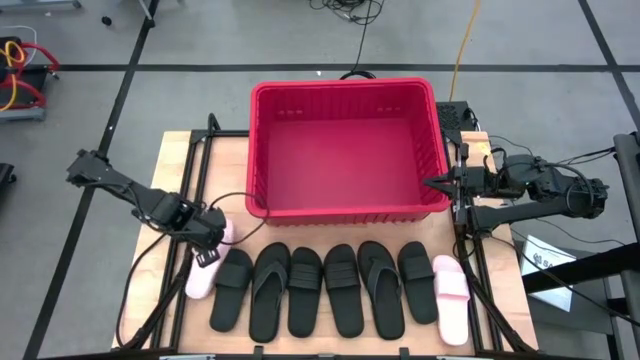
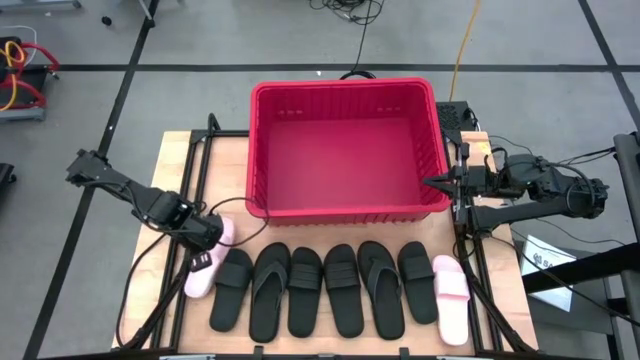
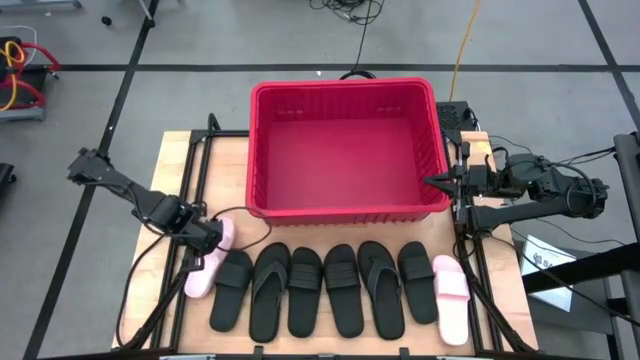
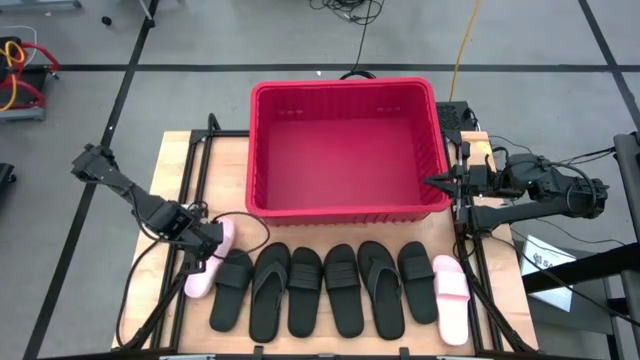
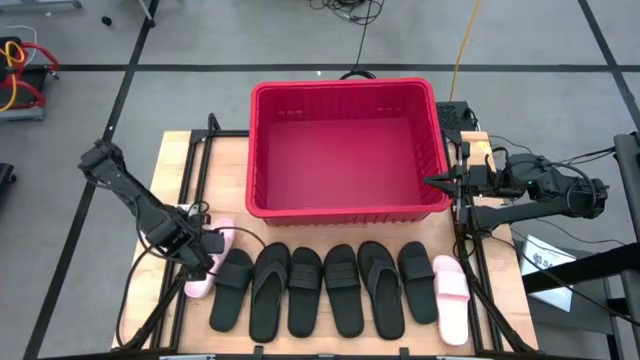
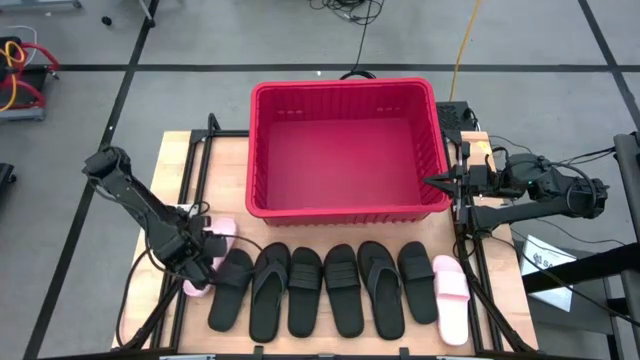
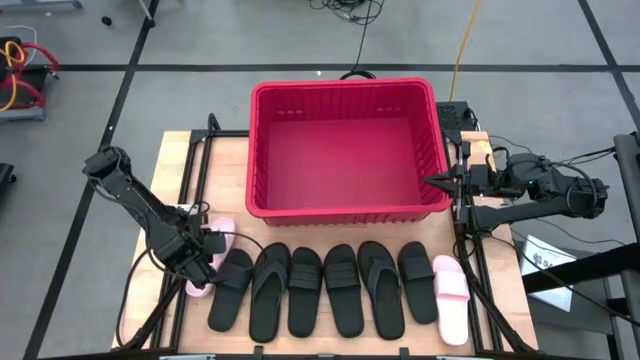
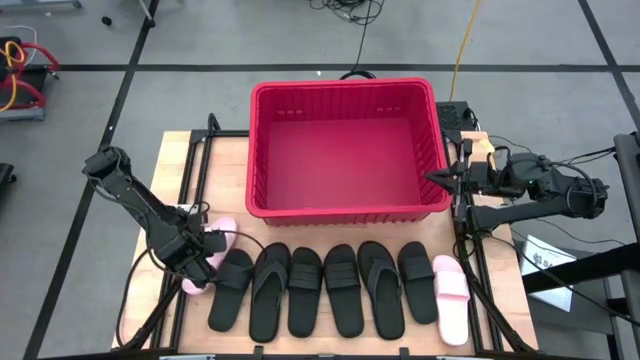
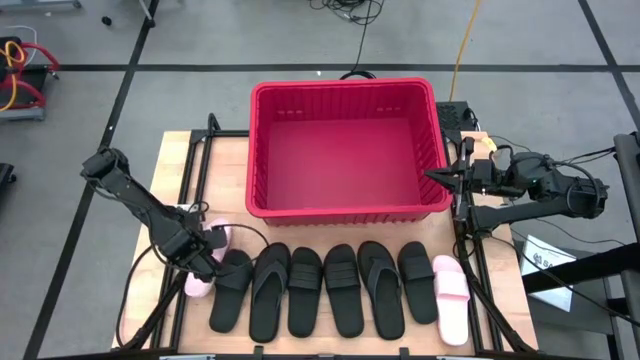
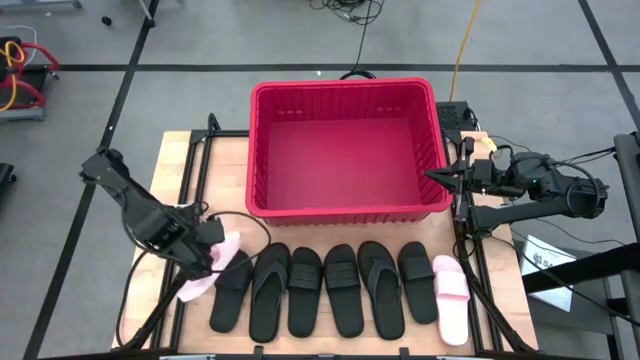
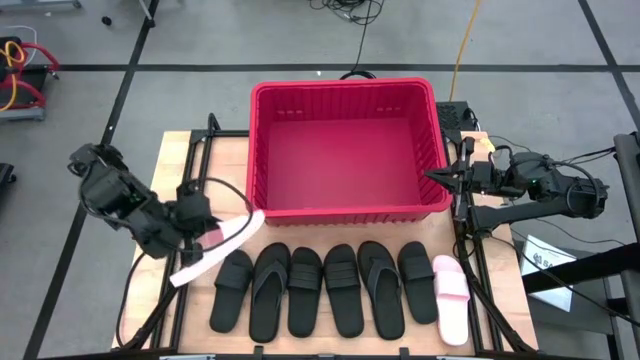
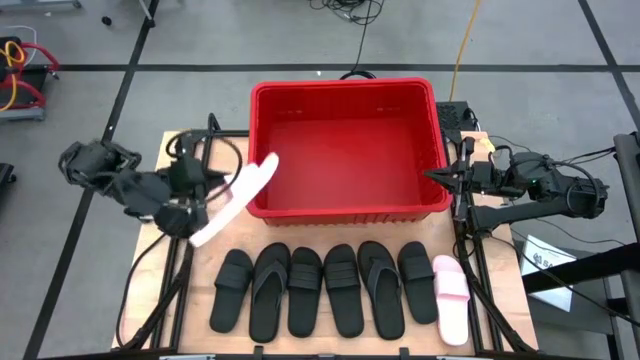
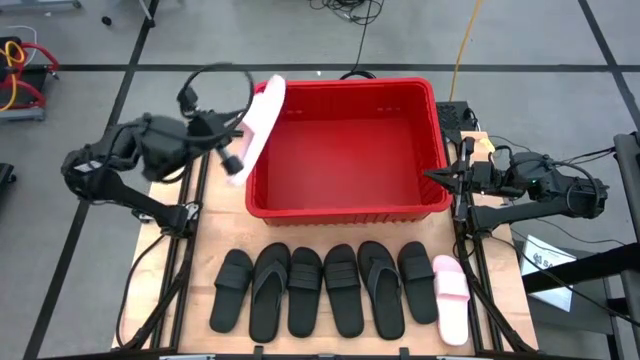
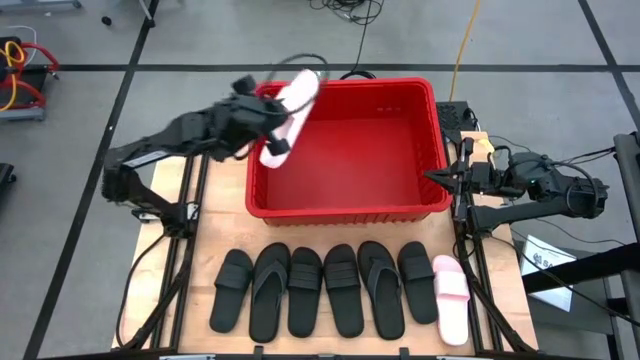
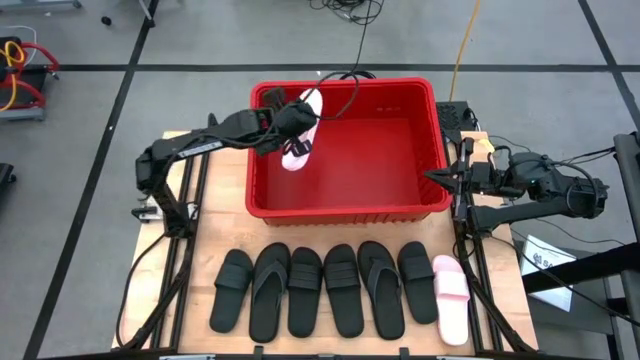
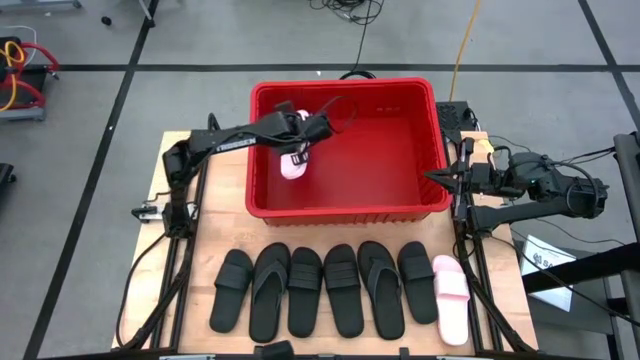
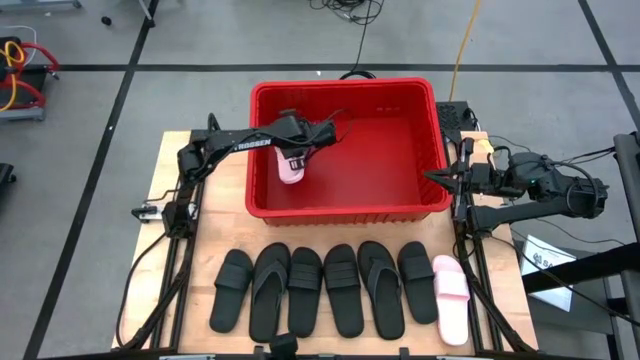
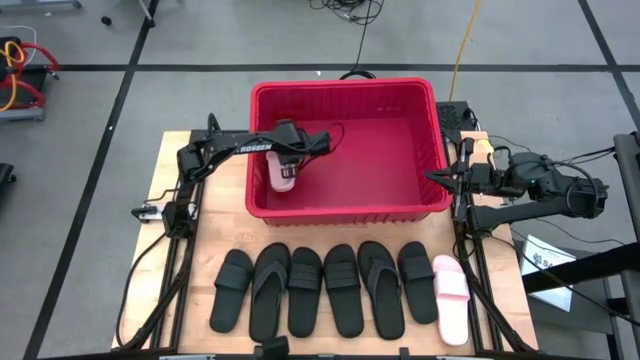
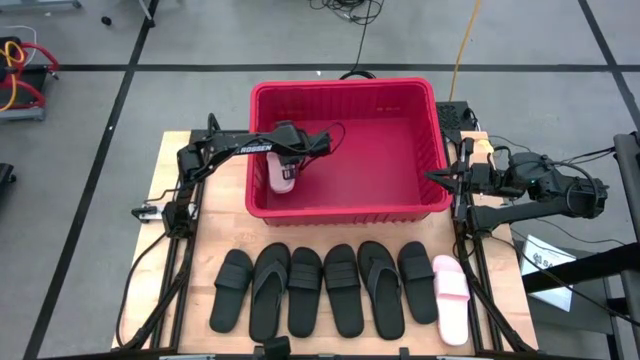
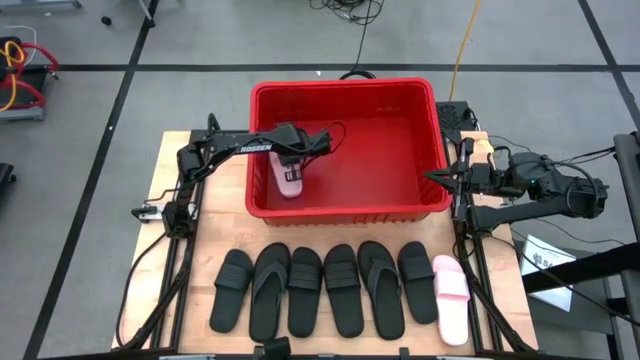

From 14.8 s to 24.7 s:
Task: Pick and place slides into bin
Put the pink slide into the red bin

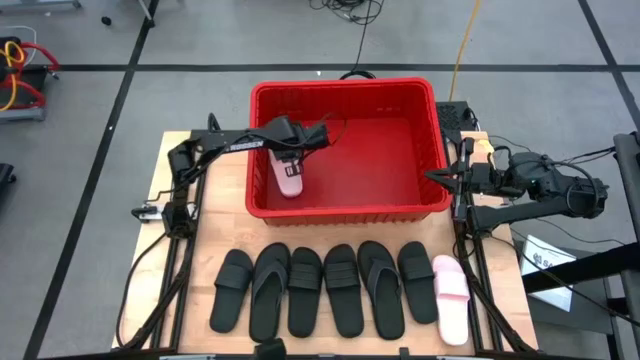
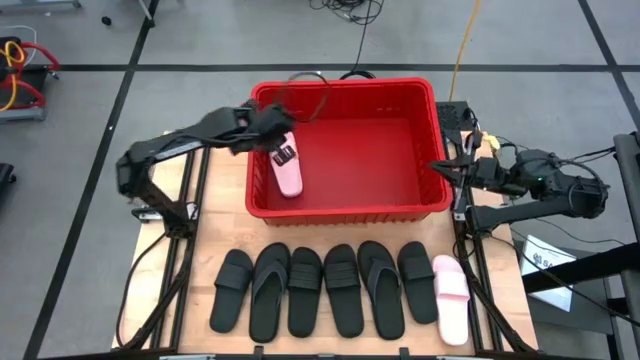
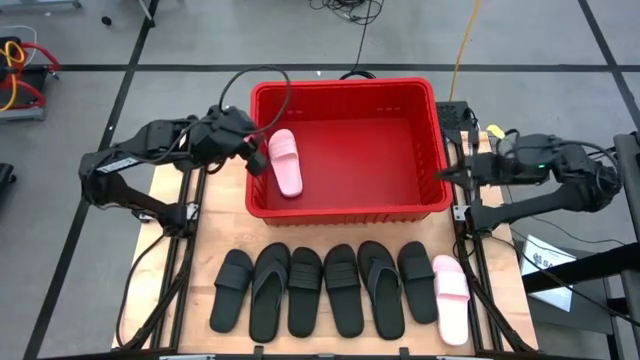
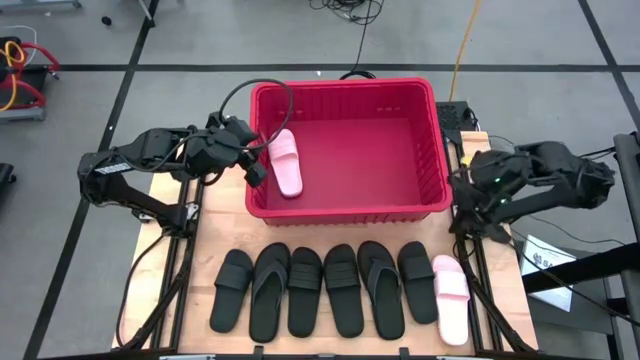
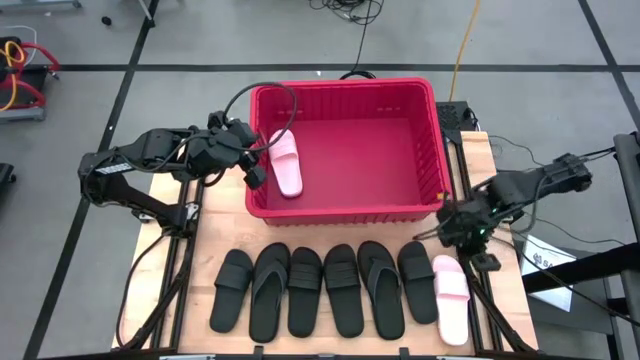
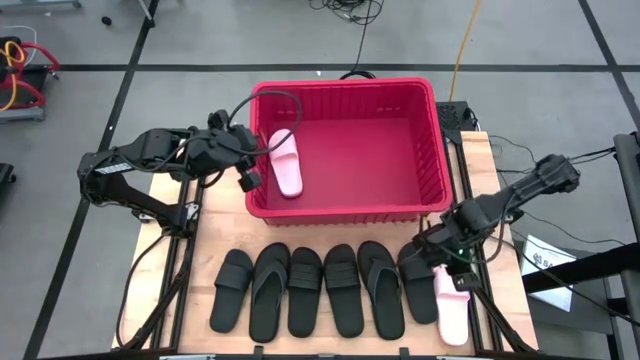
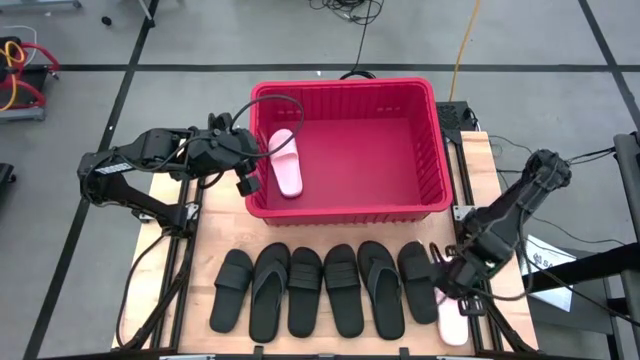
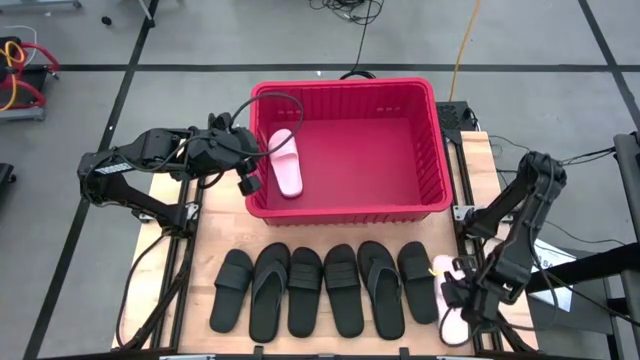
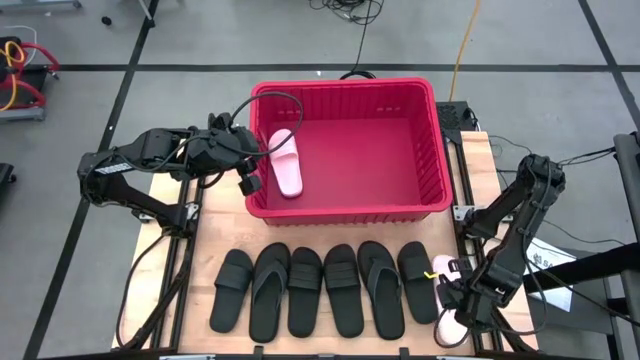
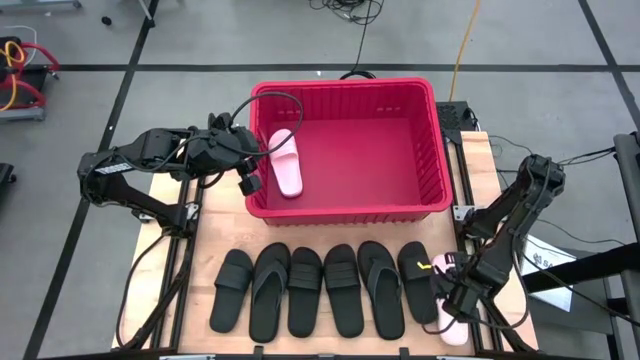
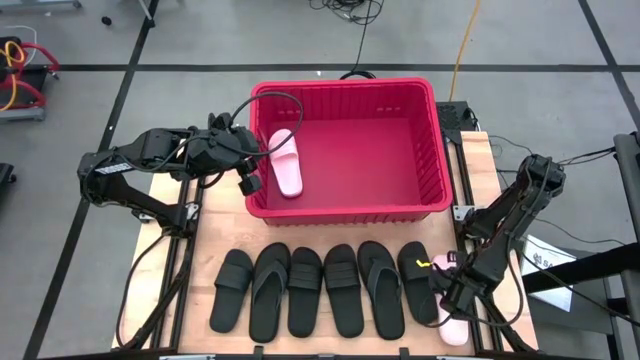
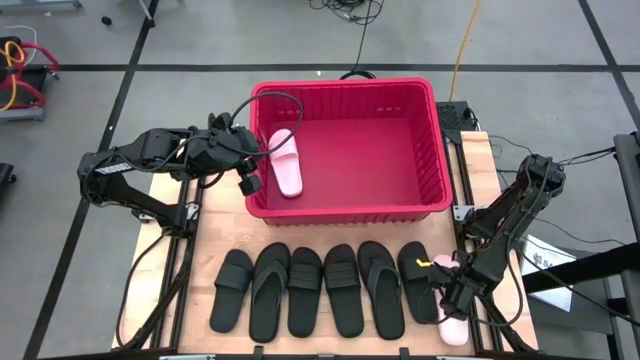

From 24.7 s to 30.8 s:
Put the pink slide into the red bin

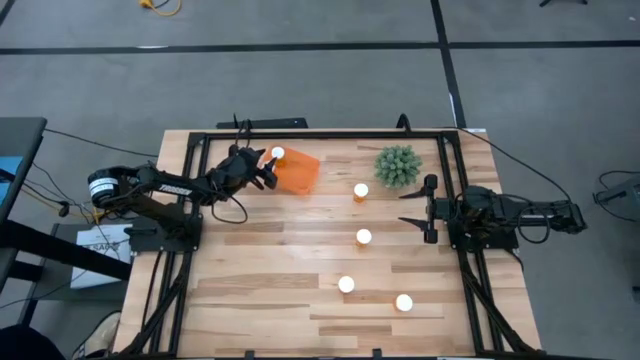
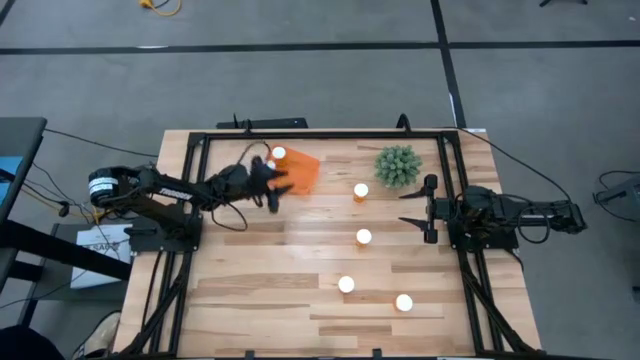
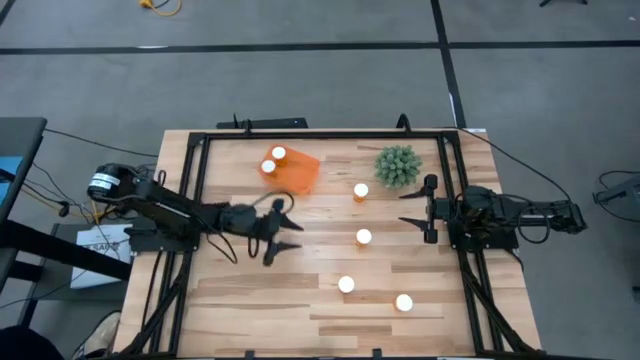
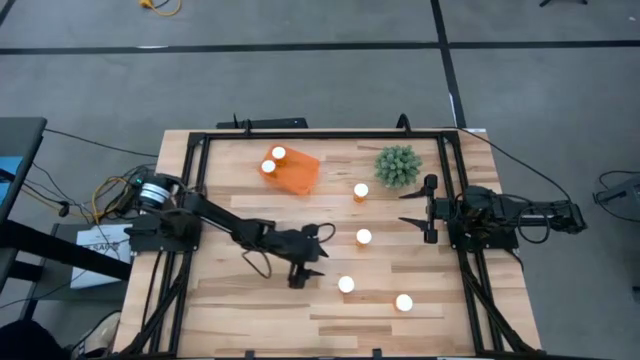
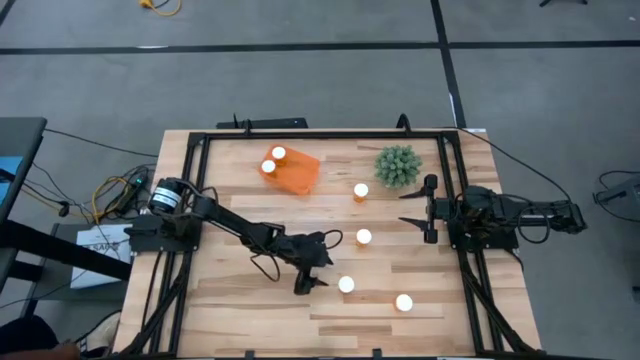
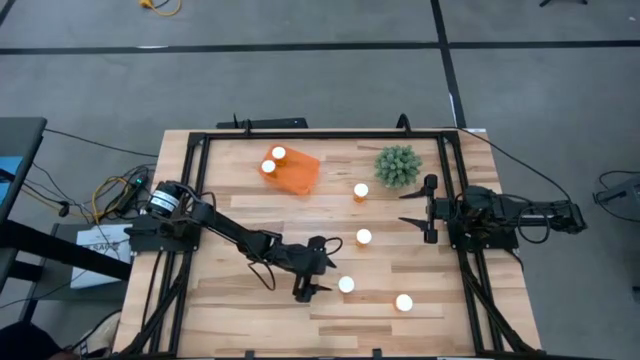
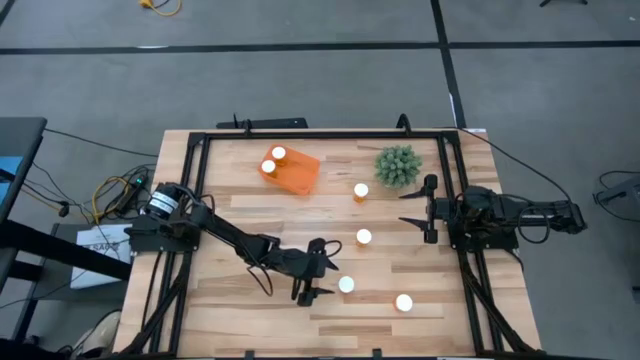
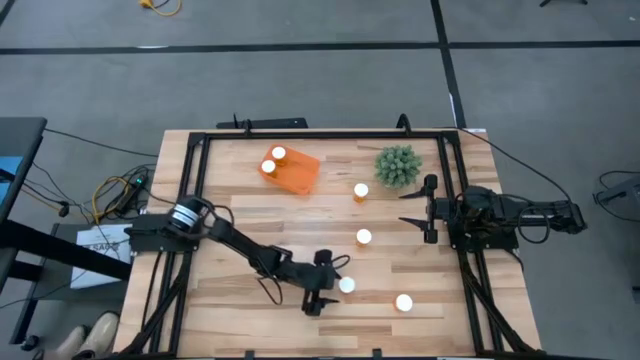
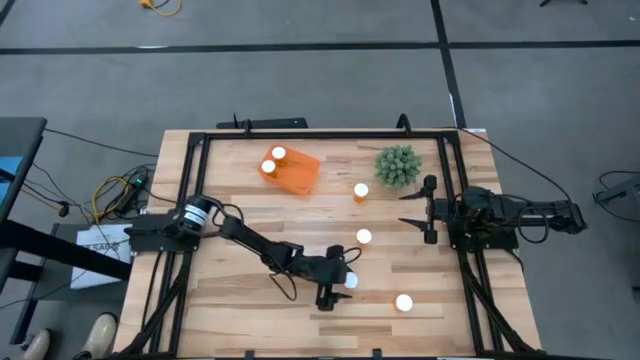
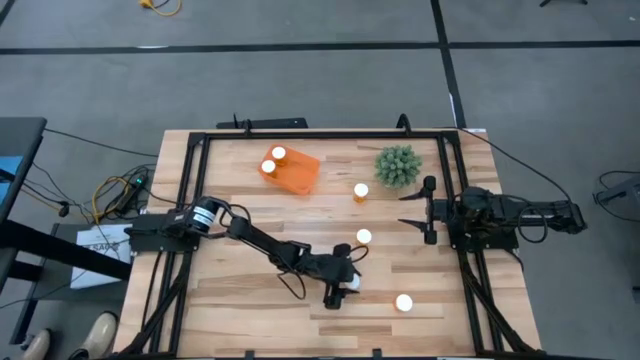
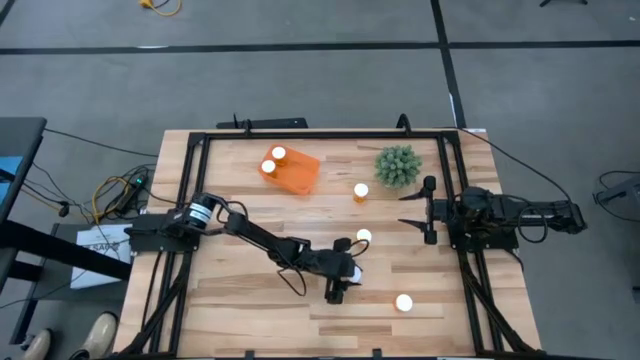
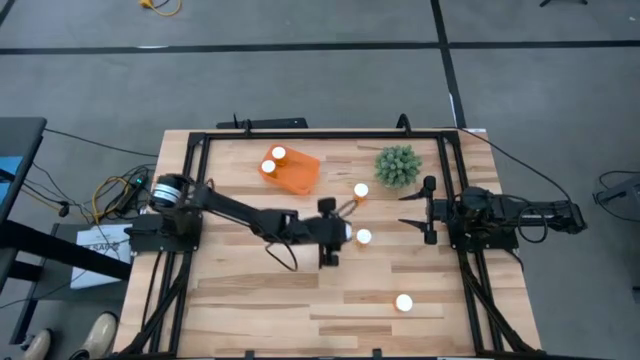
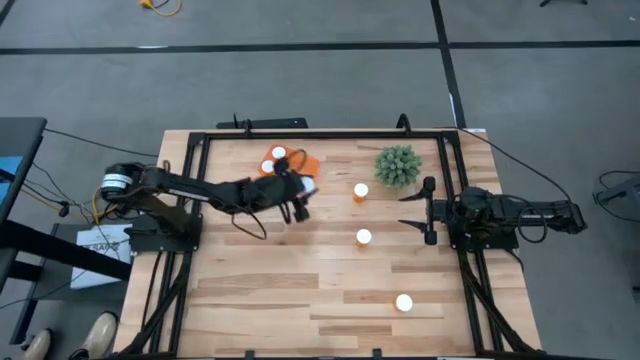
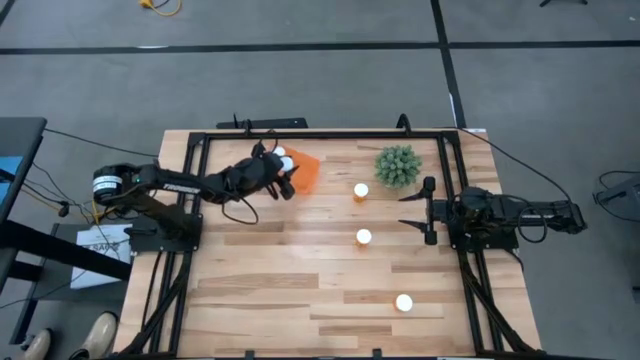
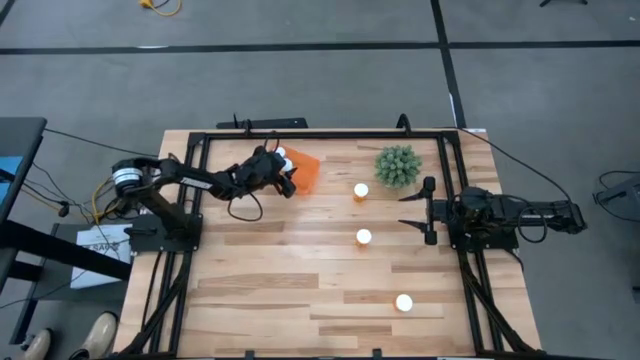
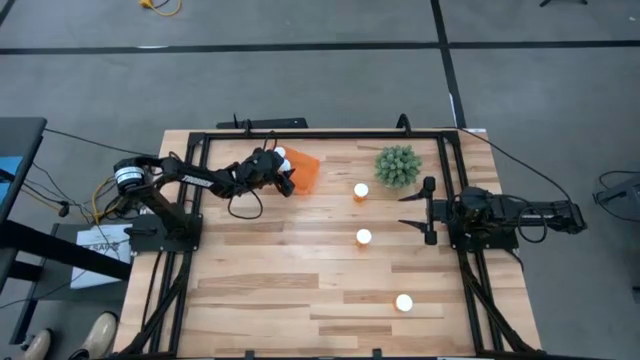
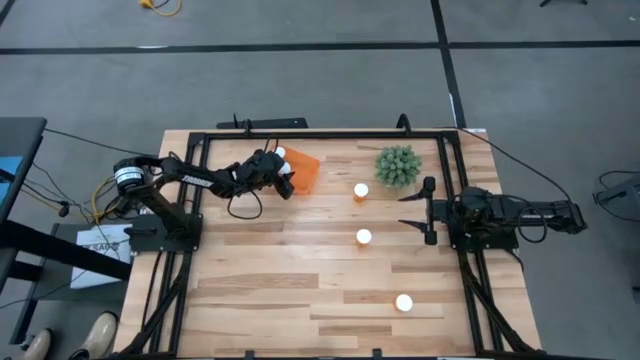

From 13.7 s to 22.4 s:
Task: Pick and place pill bottles into a basket
Put the orange pill bottle into the orange bin
